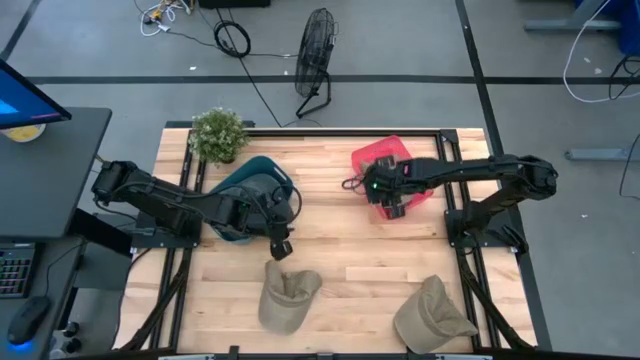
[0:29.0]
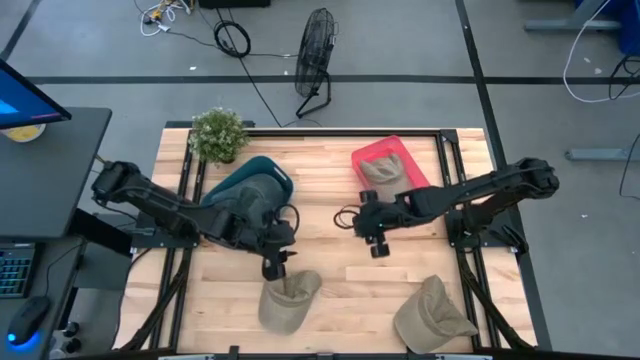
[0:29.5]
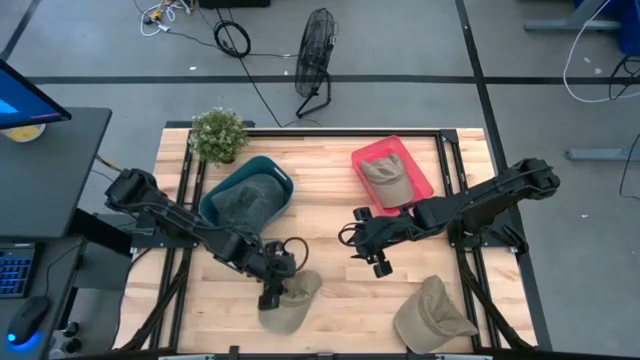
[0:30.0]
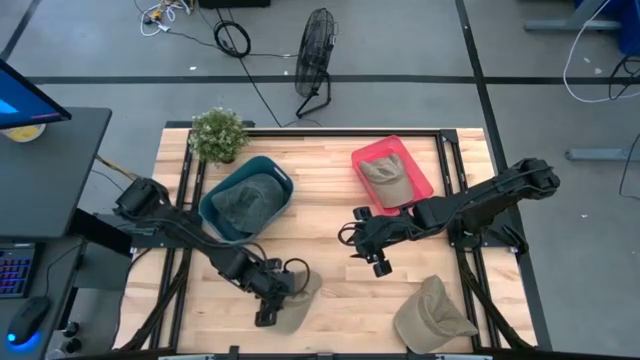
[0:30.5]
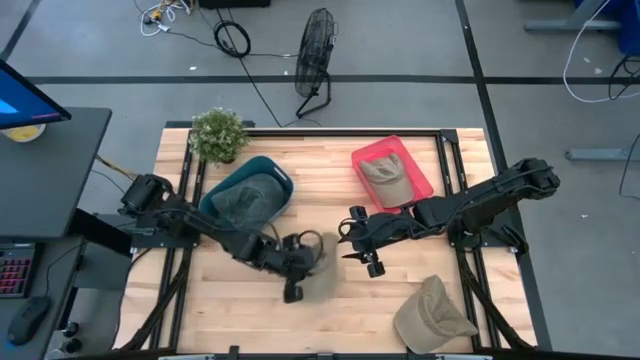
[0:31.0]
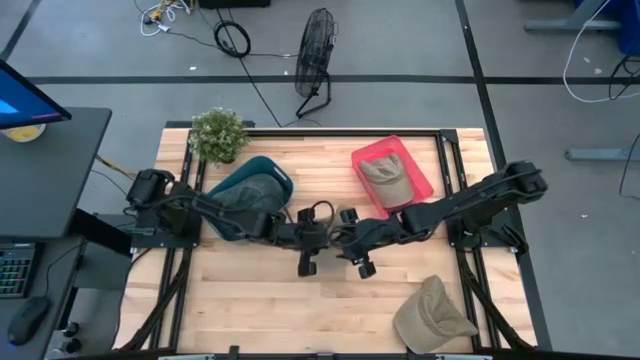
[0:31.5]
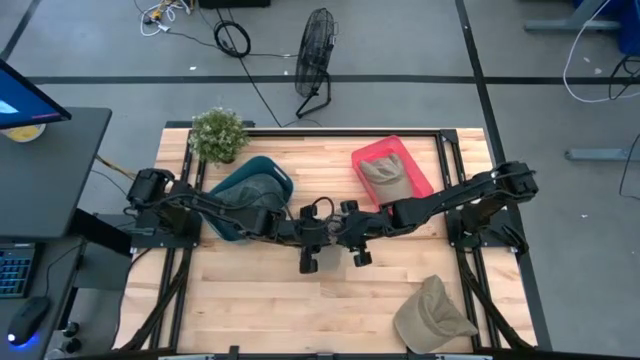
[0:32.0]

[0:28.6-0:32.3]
Task: Pick & Place hat
Put the left brown cap into the red bin

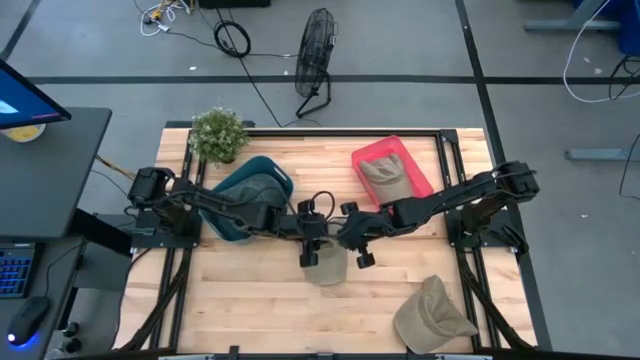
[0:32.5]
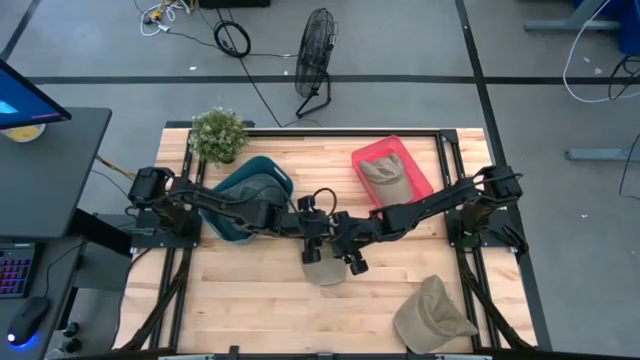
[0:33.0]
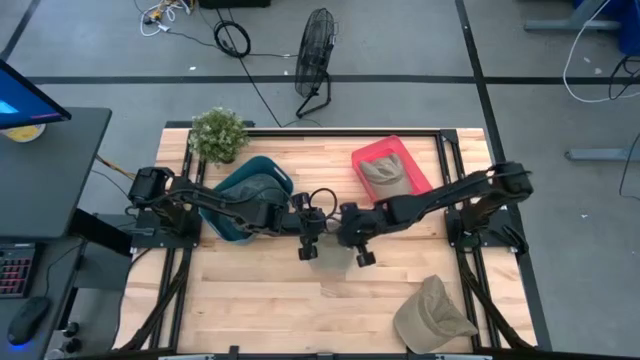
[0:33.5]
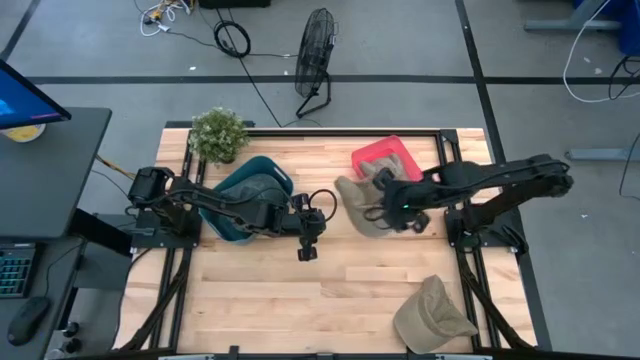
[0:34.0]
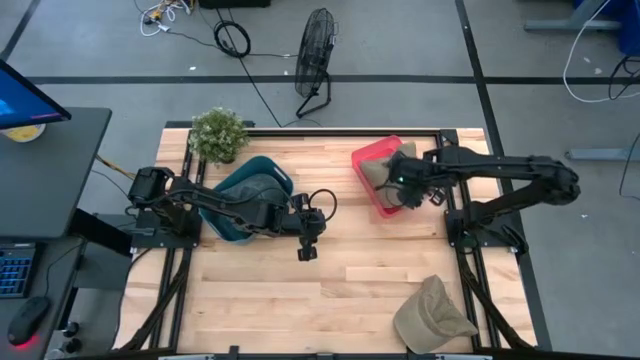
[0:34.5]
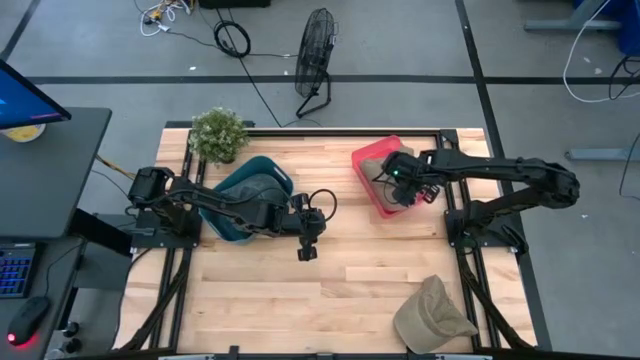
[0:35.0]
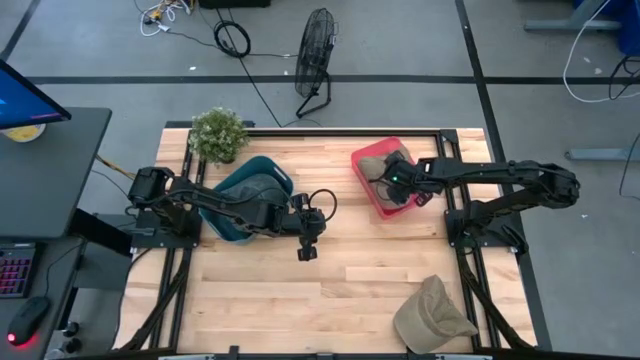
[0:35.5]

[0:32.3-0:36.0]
Put the left brown cap into the red bin

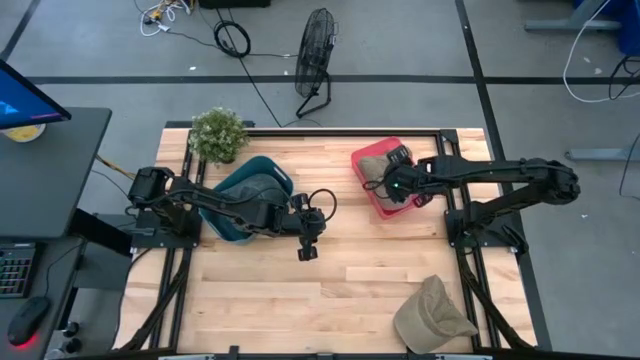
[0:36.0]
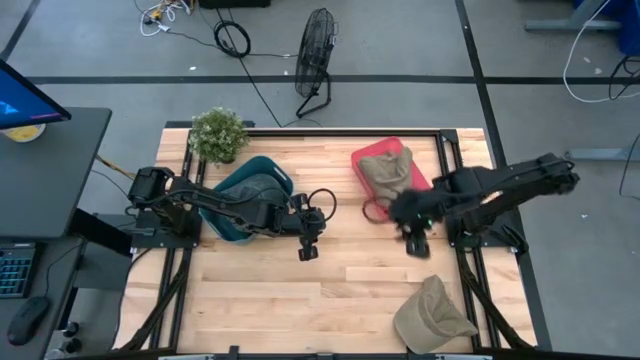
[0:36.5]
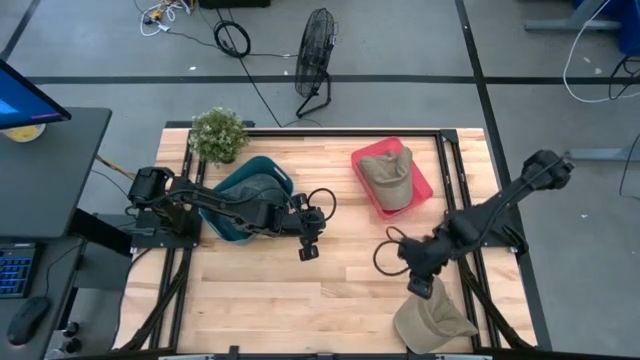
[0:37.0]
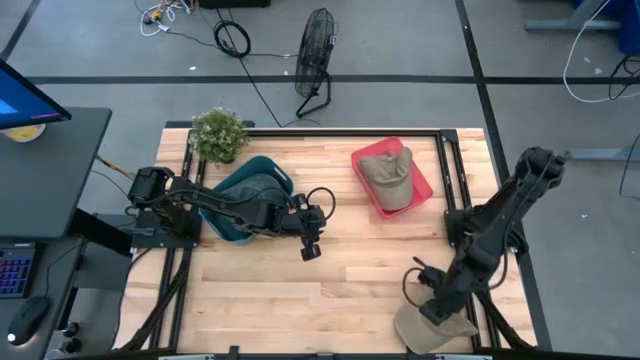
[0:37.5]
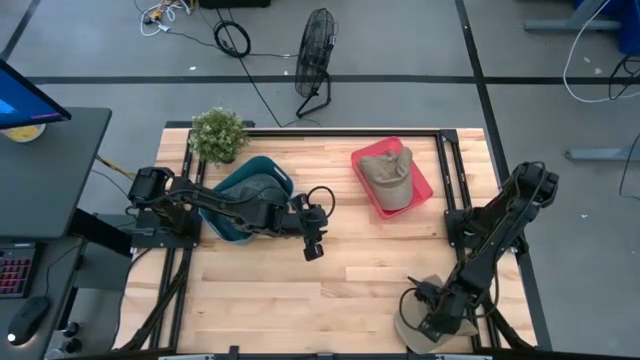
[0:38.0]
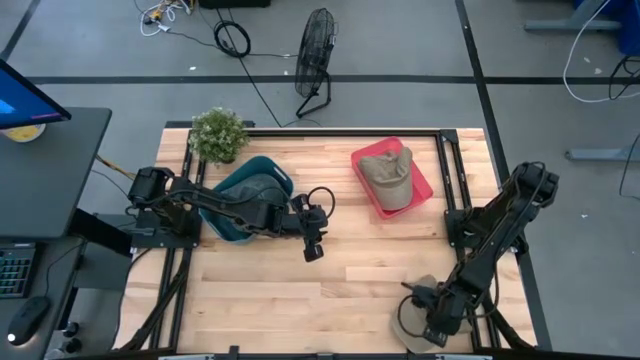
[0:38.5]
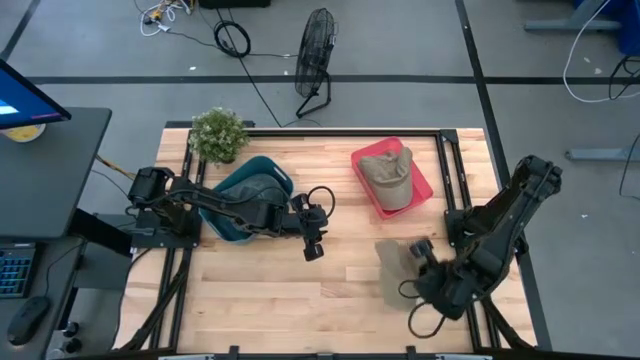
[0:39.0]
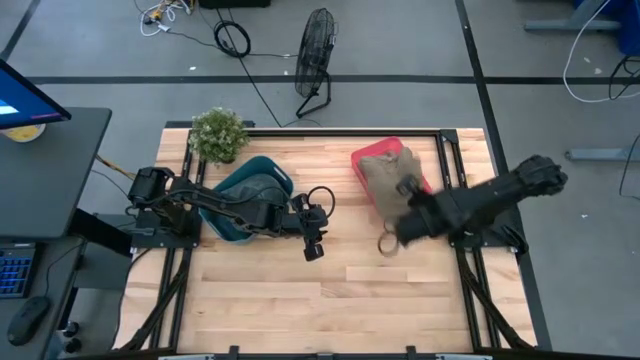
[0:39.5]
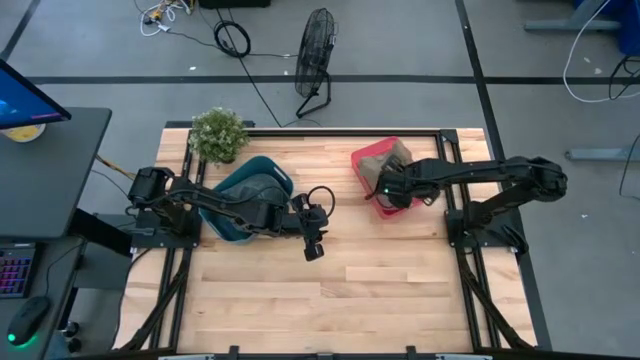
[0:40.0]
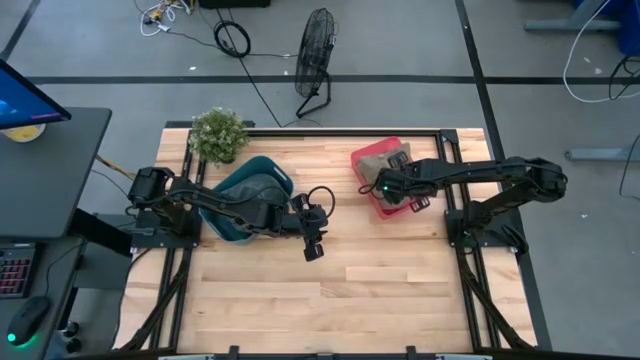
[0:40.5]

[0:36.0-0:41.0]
Put the brown cap into the red bin

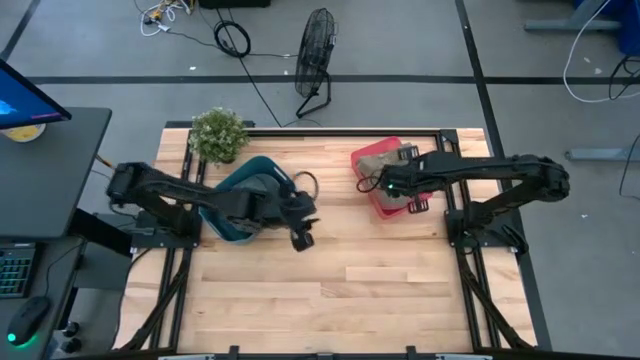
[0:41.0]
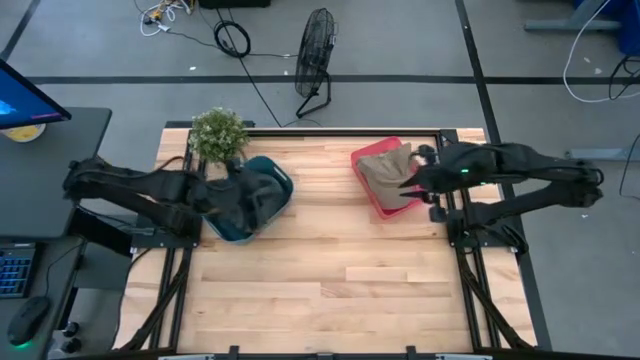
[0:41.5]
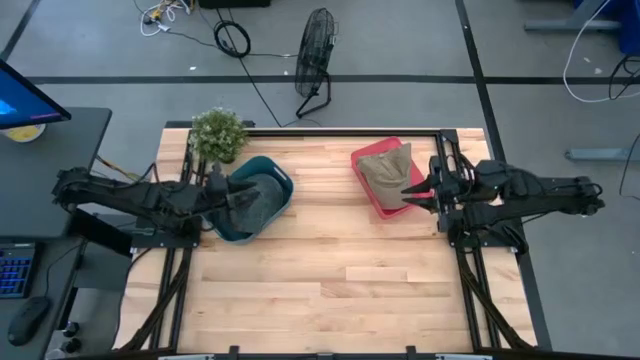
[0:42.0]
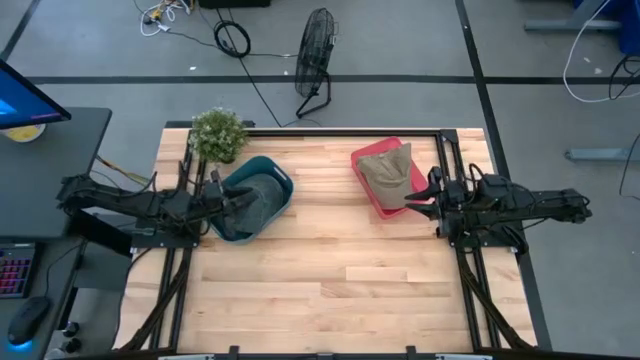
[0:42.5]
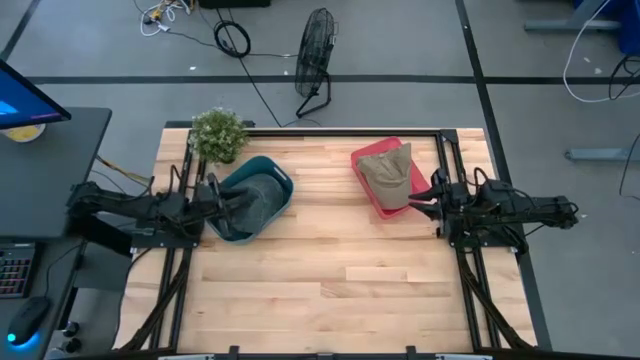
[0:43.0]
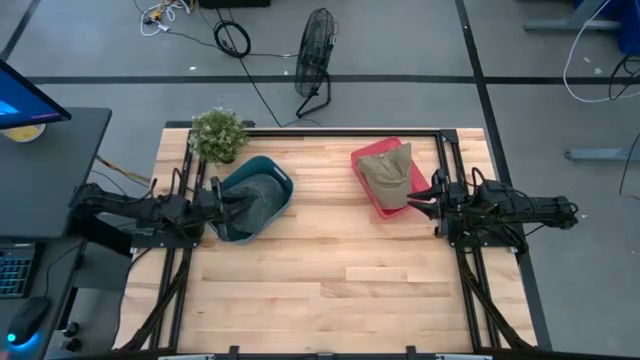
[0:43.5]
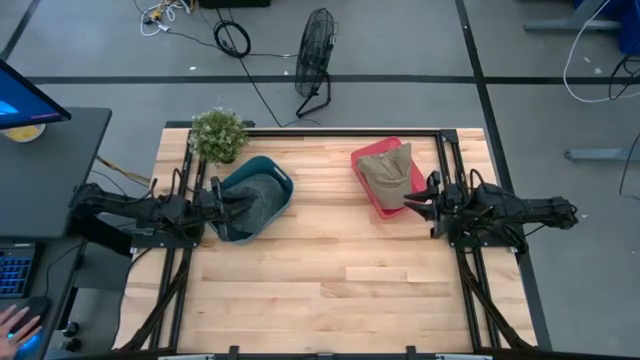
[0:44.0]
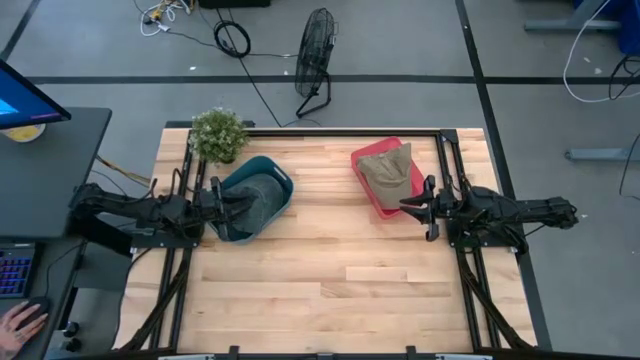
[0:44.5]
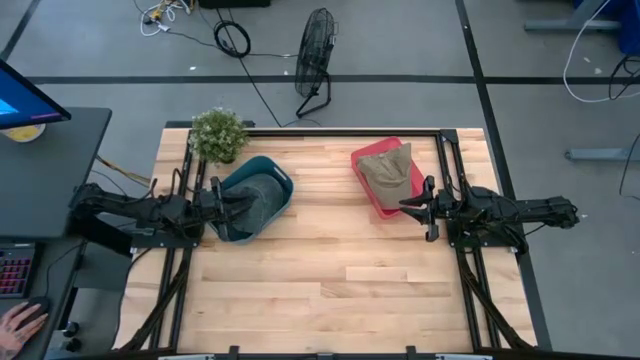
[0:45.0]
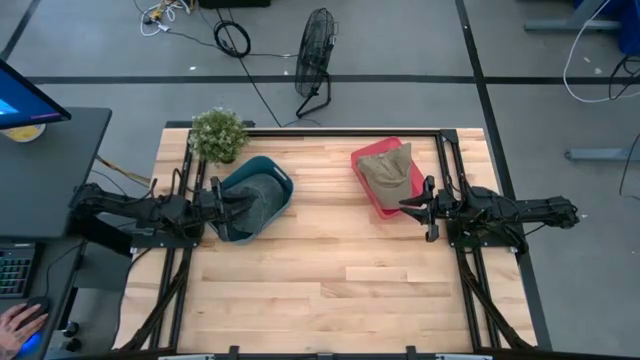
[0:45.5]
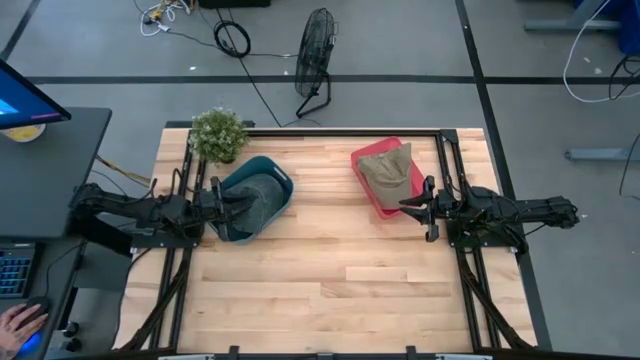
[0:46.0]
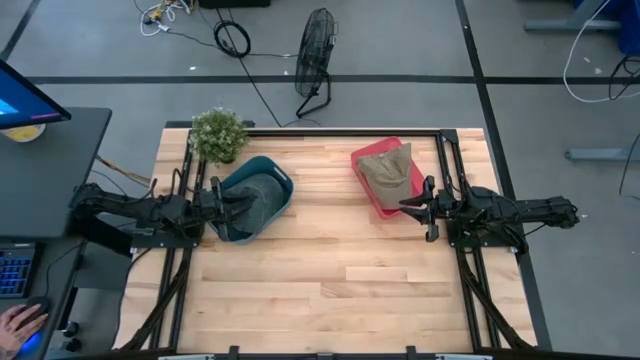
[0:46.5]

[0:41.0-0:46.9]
Return to Home Position

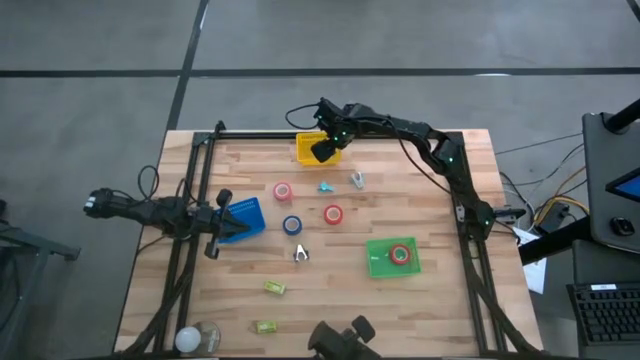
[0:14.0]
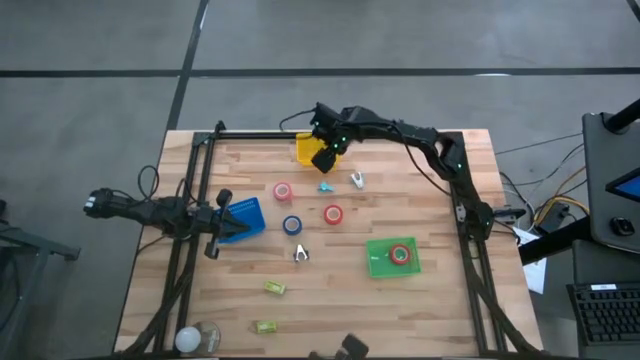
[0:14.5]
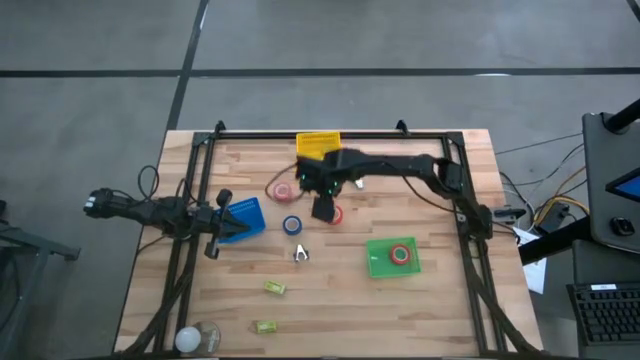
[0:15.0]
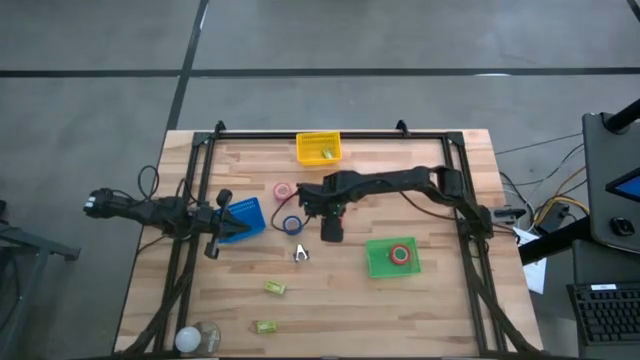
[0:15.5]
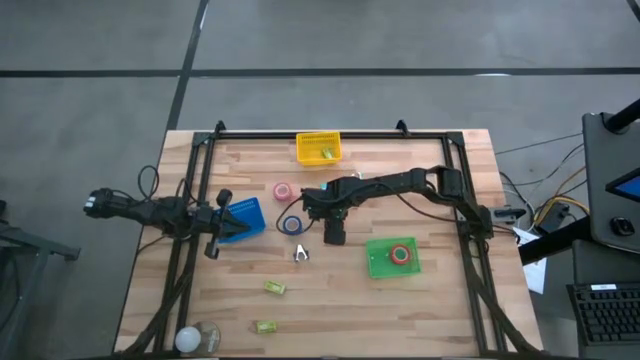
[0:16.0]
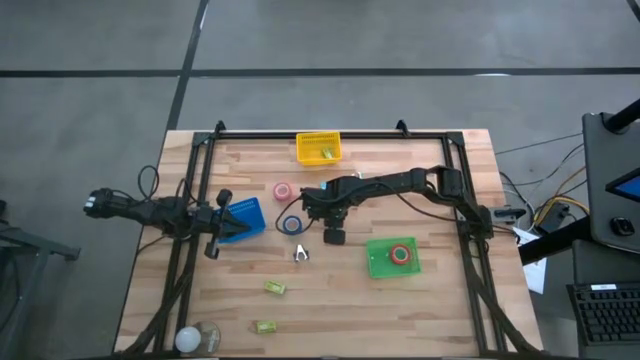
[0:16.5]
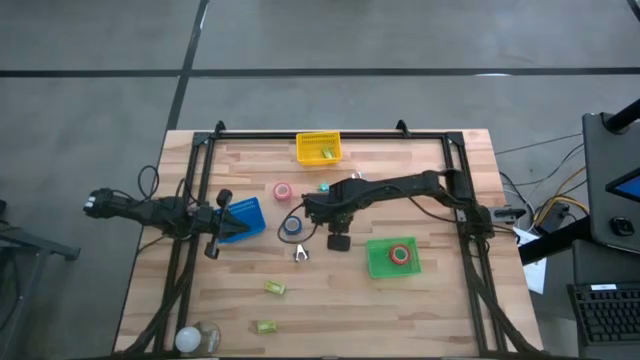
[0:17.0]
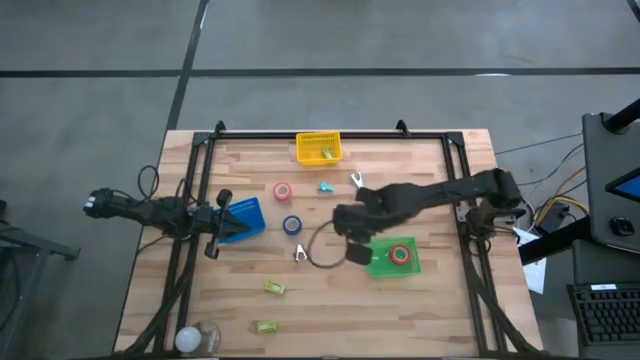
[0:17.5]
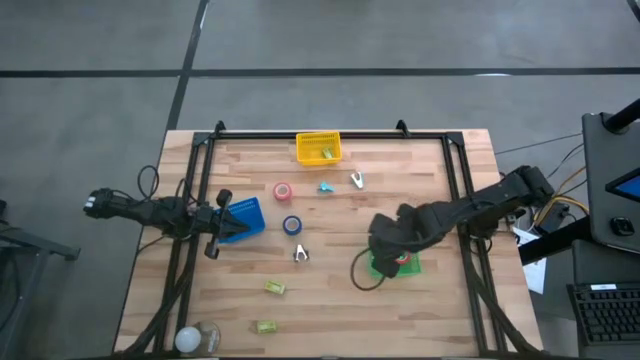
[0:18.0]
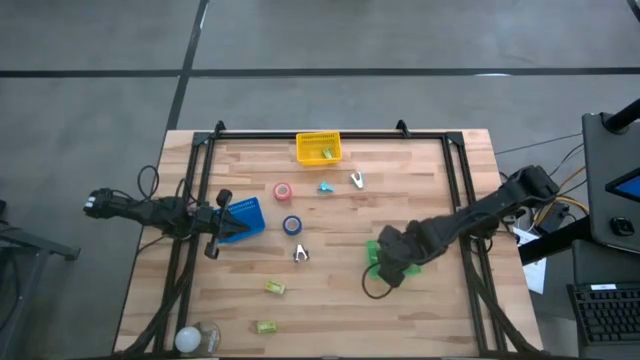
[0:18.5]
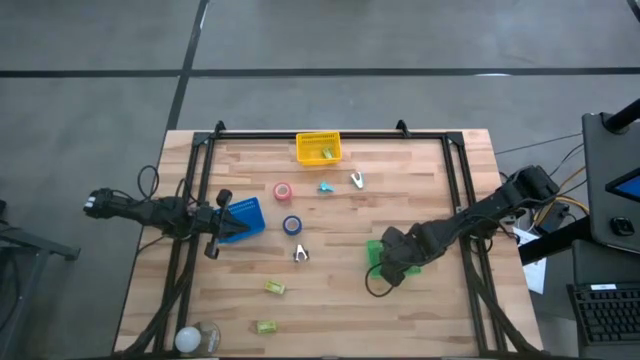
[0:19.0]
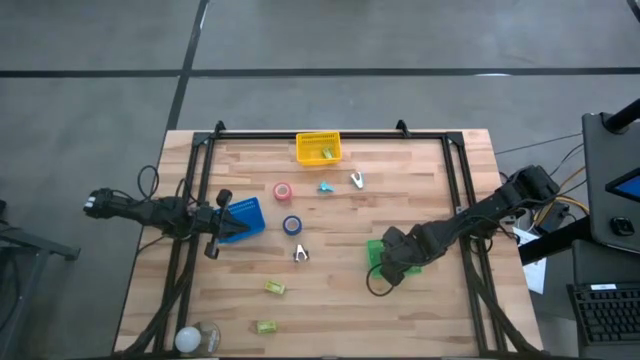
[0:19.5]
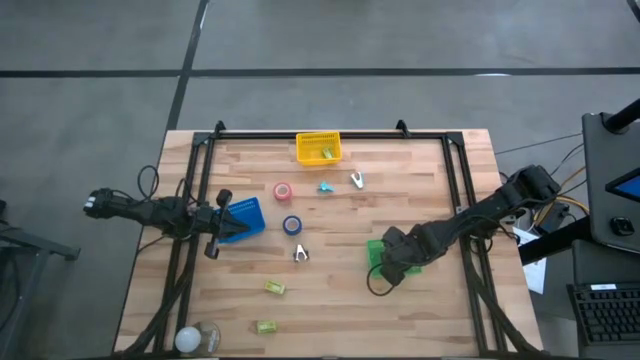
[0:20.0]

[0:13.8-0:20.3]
Task: Pick and place Stapler, Stapler remover, tape
Put the orange tape into the green bin
